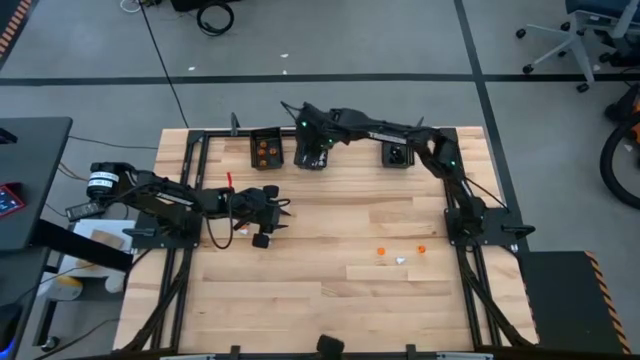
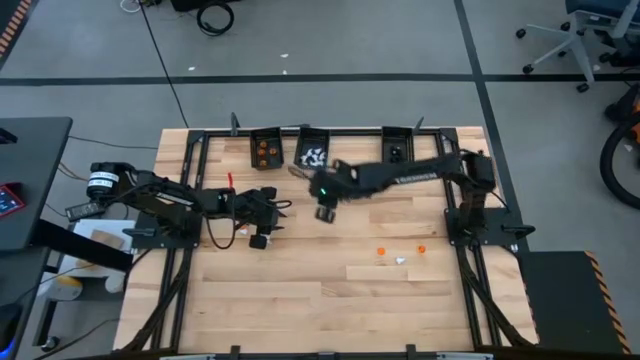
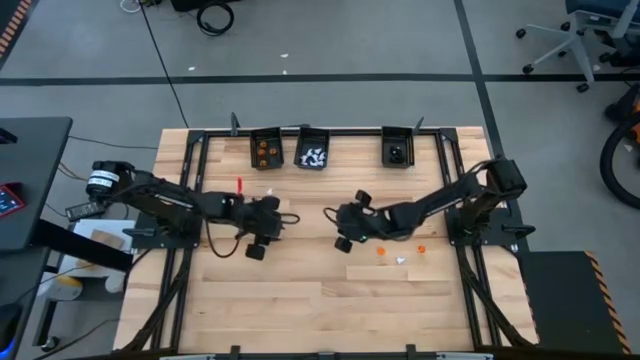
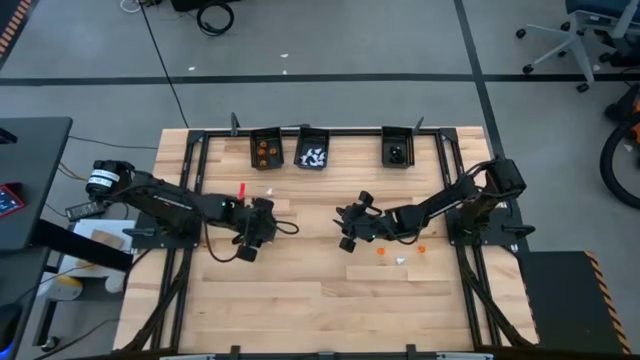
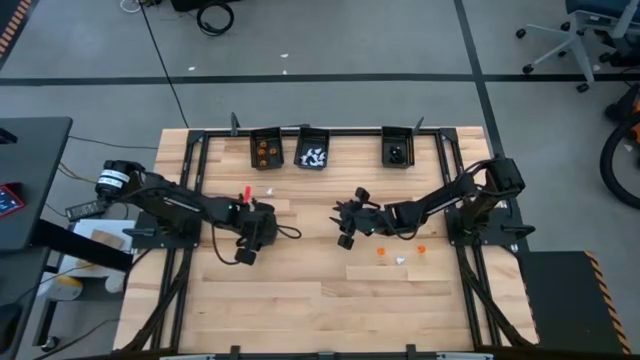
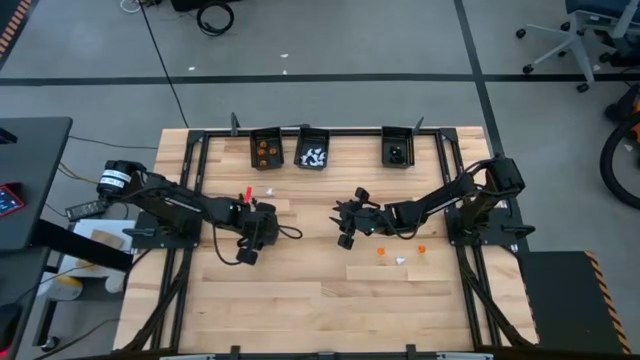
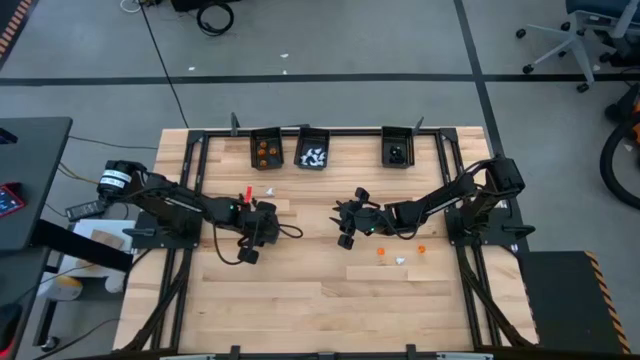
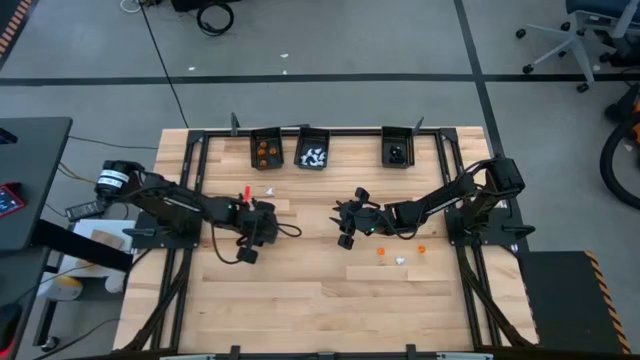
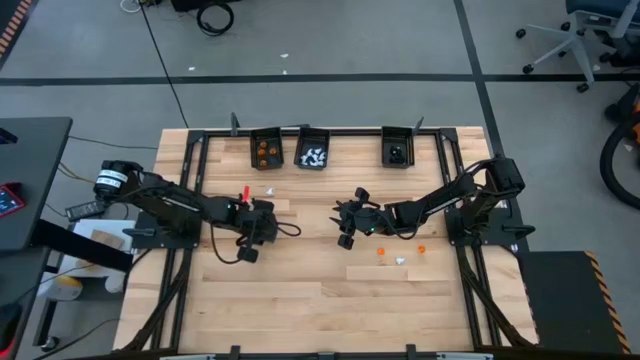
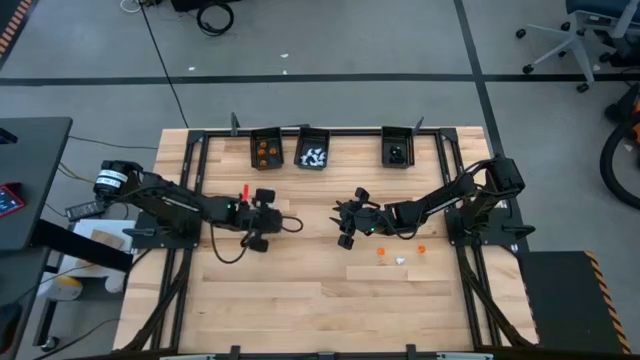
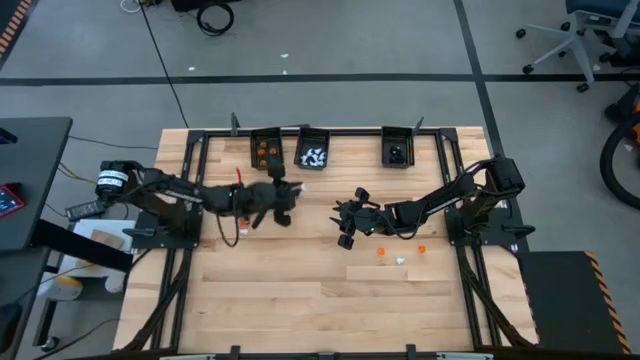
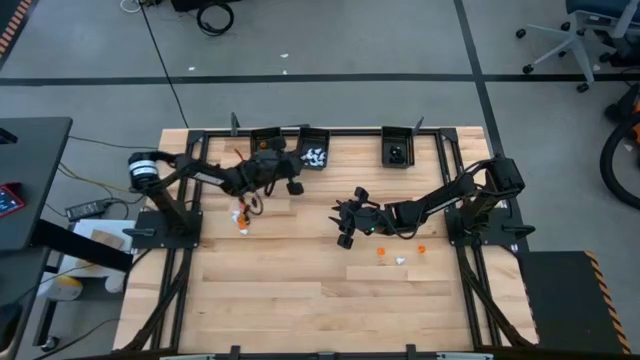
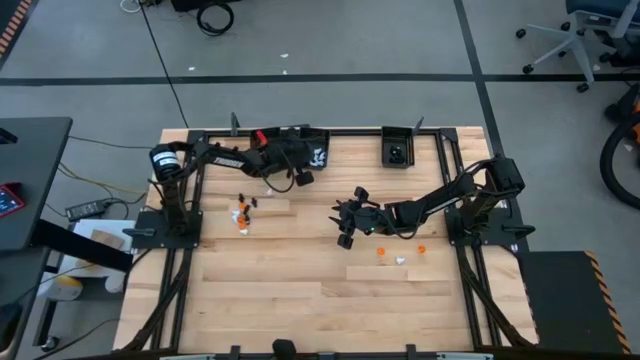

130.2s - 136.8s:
Task: Sort Halloween decoration
Put the white ghost toy into the middle black bin

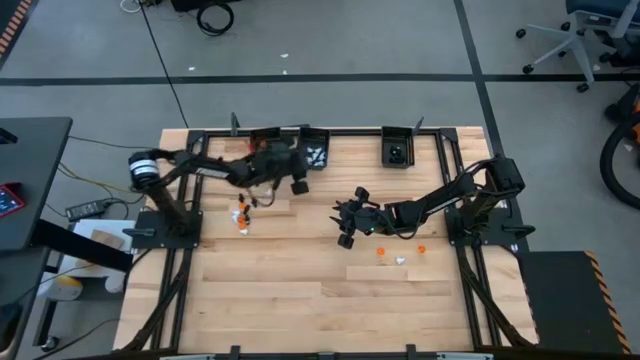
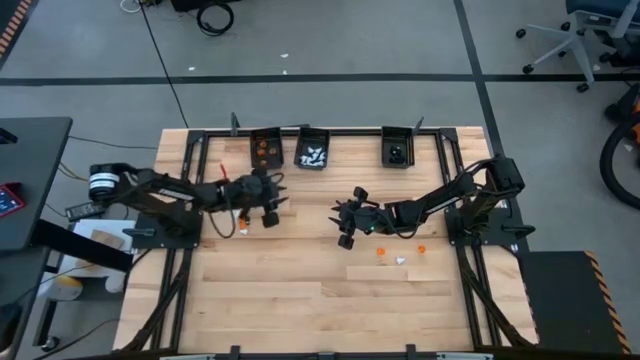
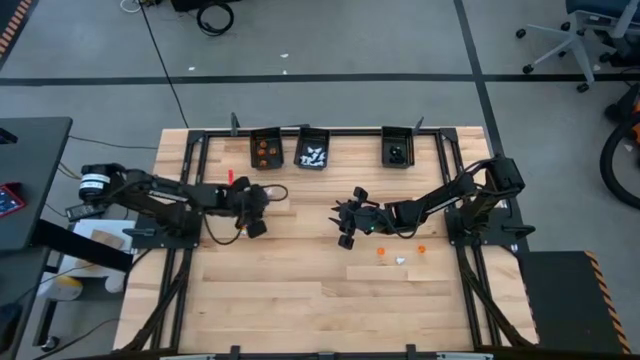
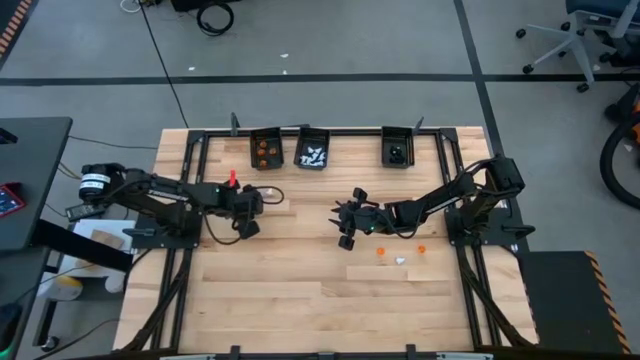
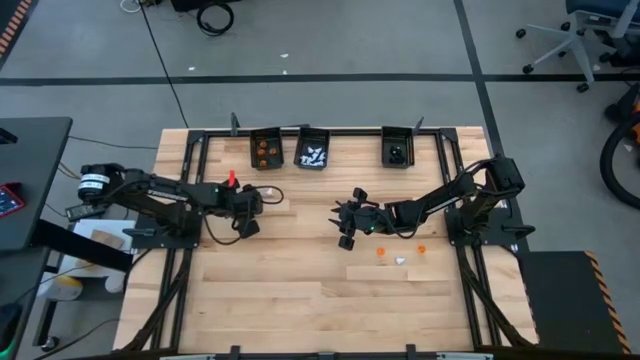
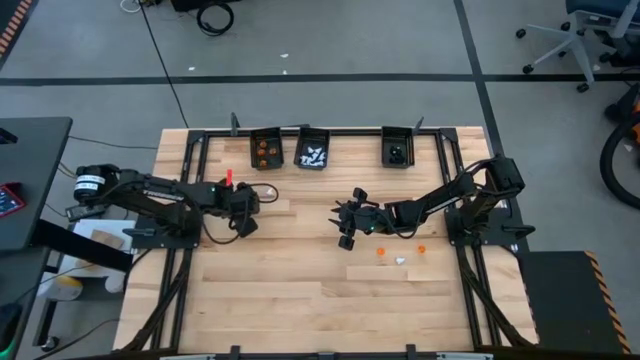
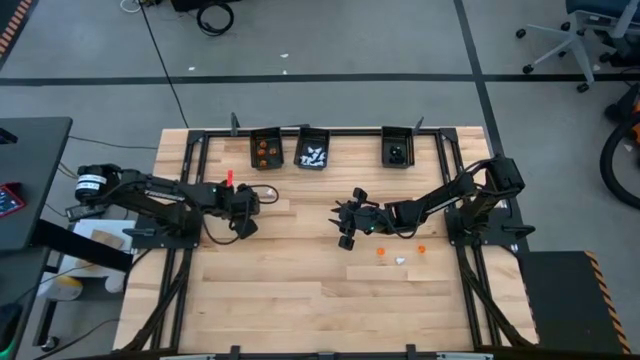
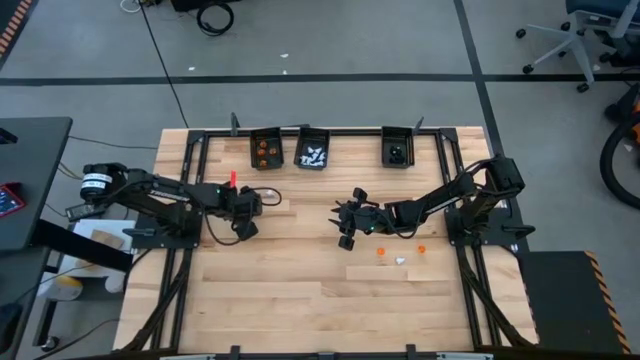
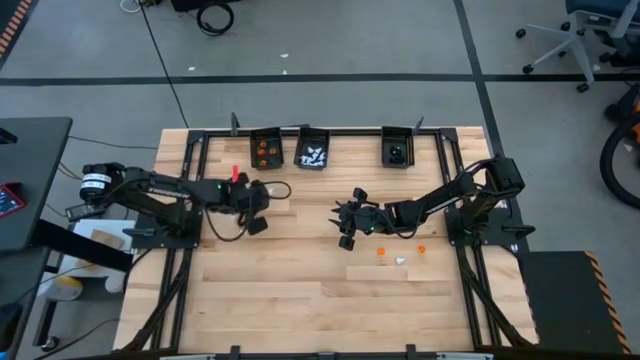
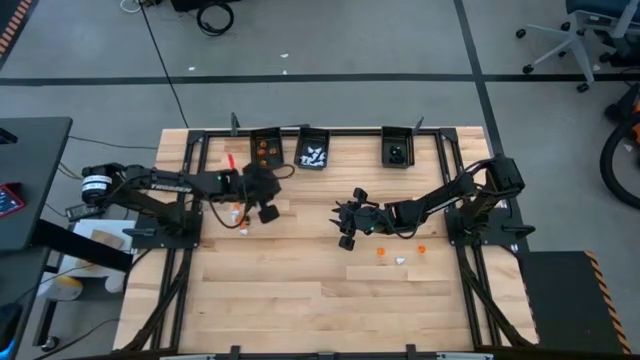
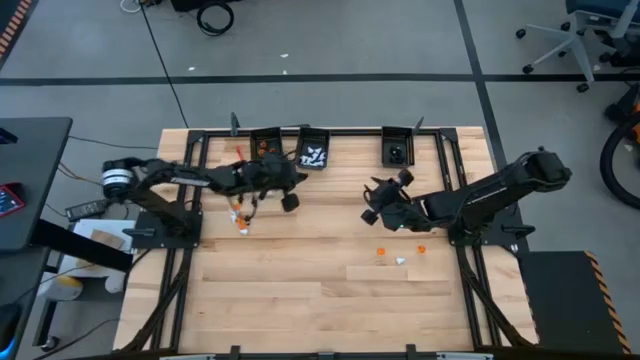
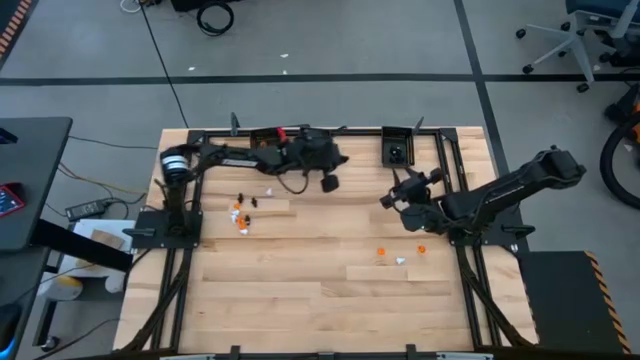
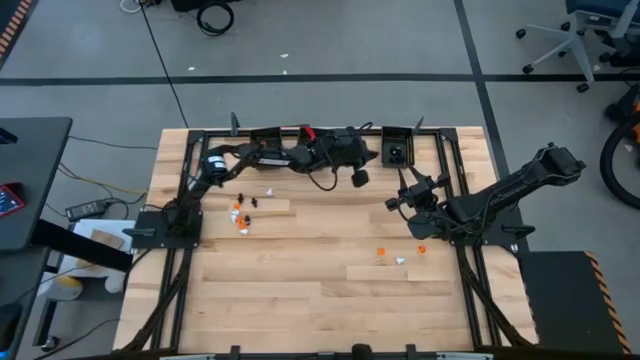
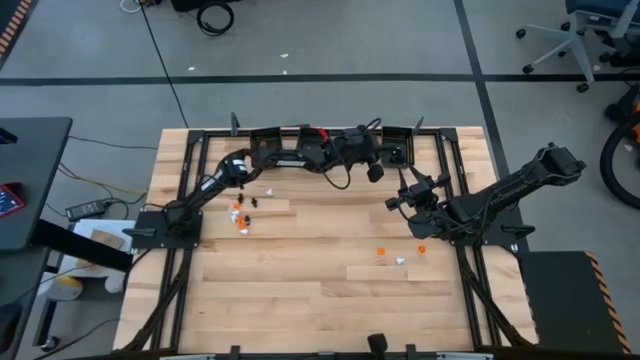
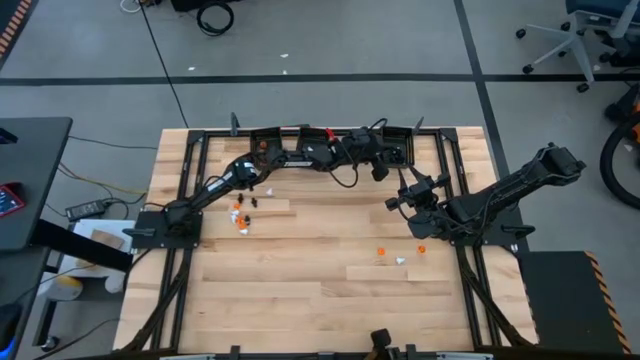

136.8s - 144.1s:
Put the black voodoo toy into the right black bin

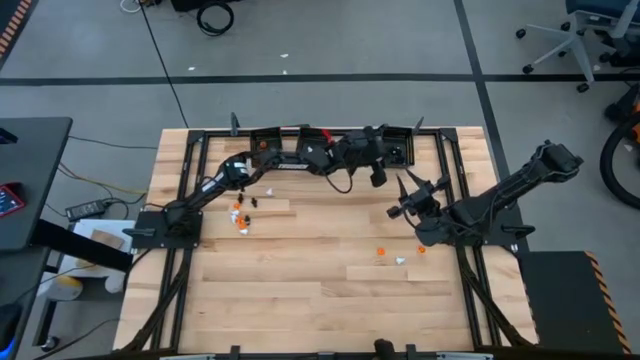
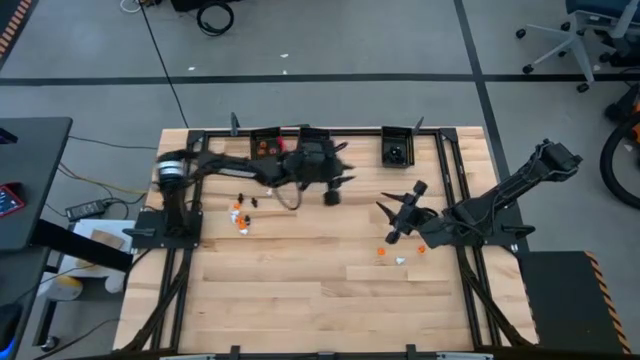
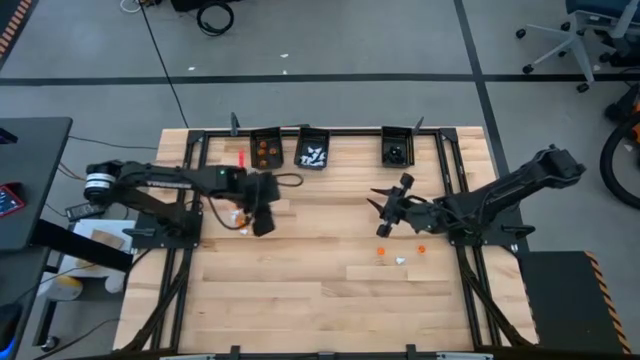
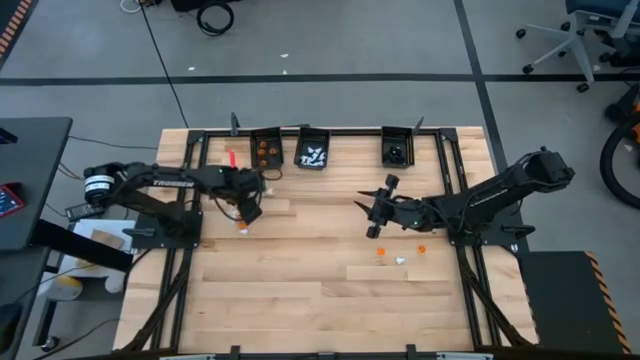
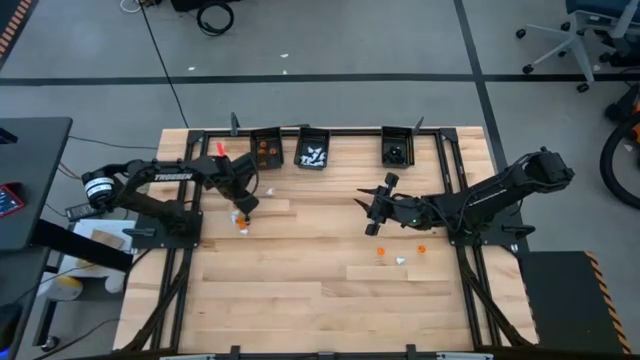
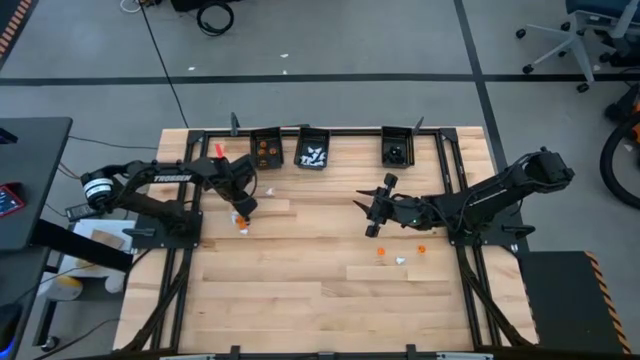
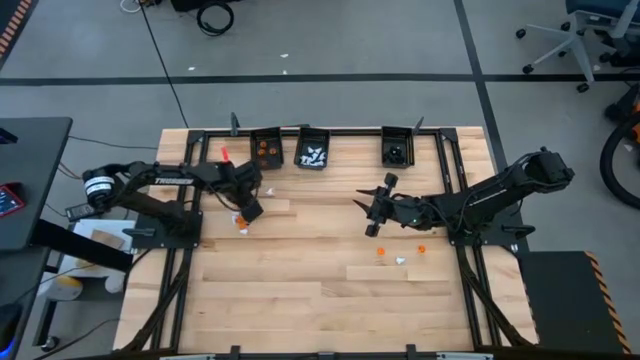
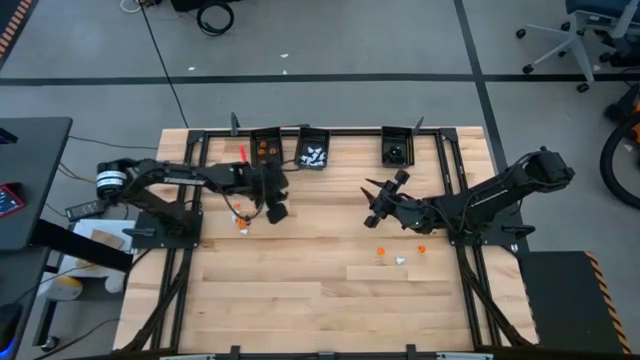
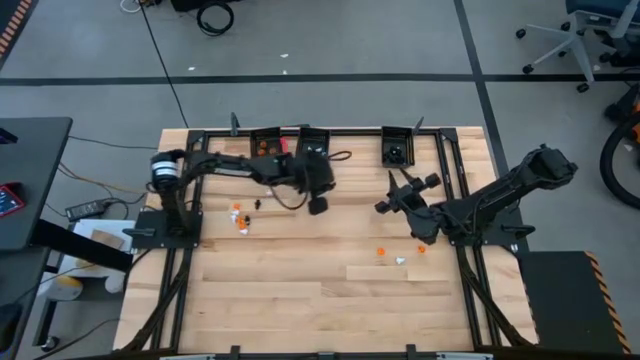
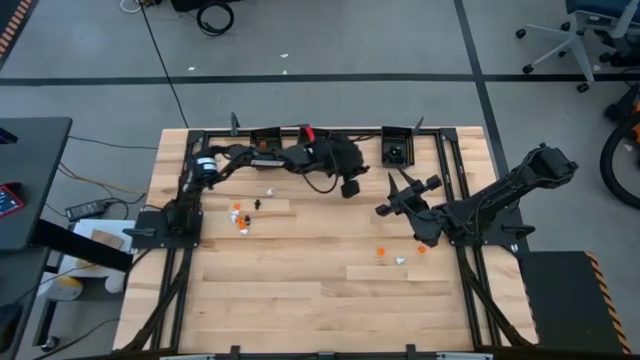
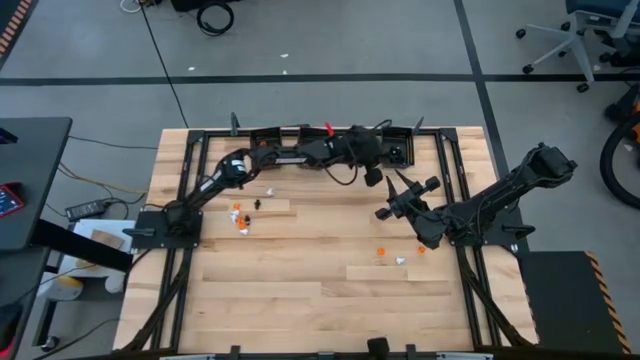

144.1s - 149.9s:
Put the black voodoo toy into the right black bin

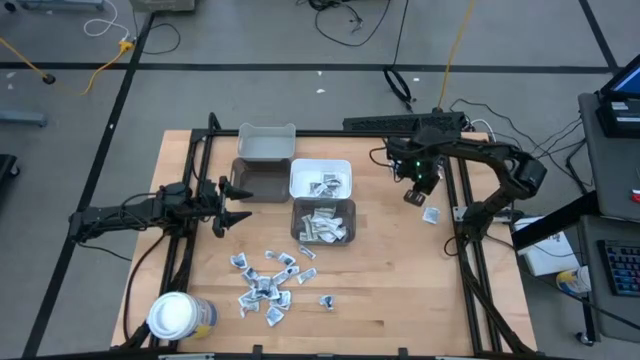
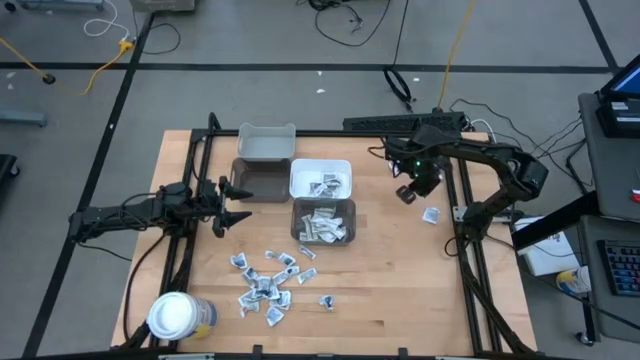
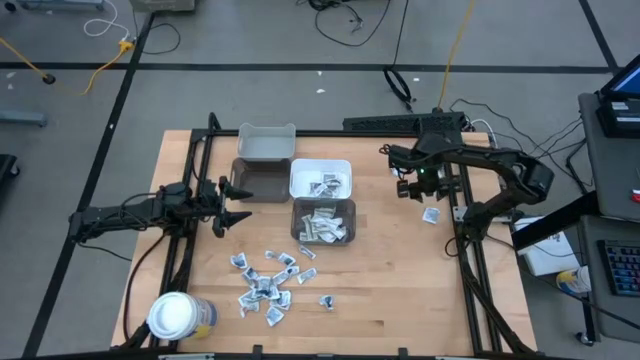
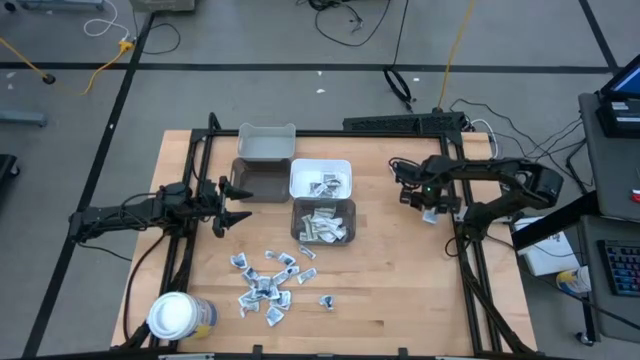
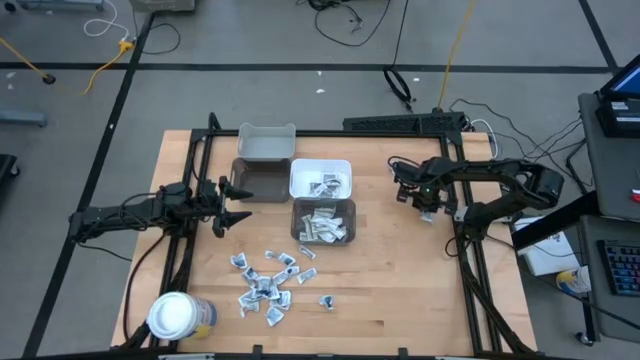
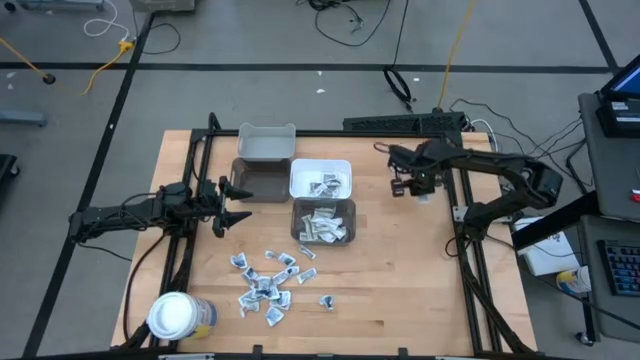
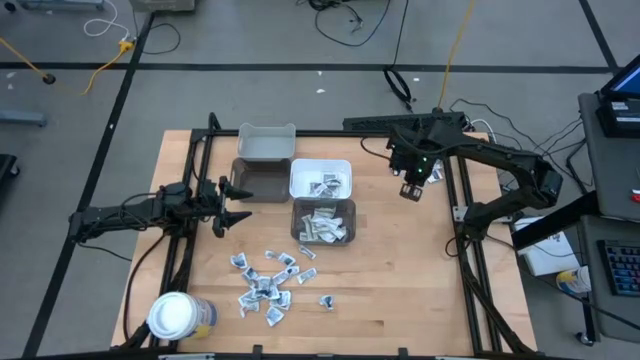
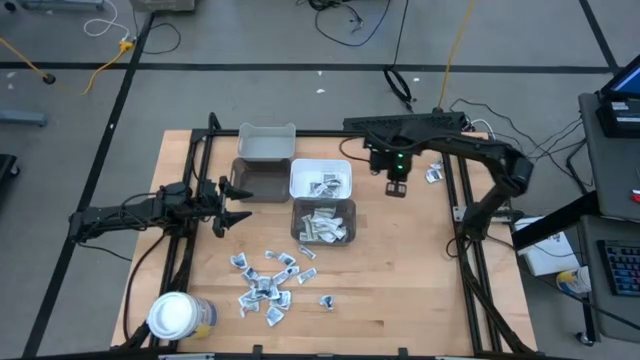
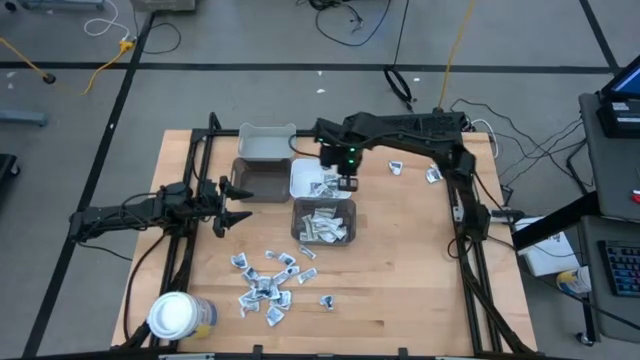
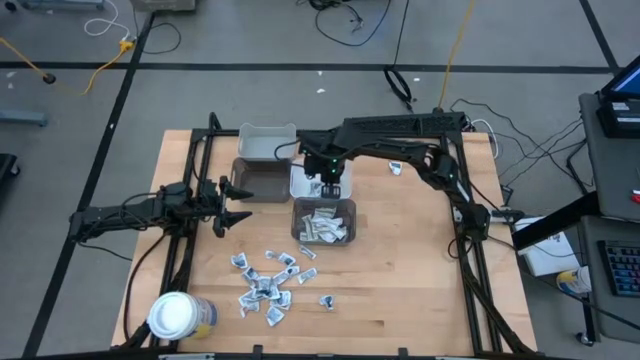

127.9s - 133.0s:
Task: Pick & Place First Aid Supplies
Put the gray towelette pack into the white bin
